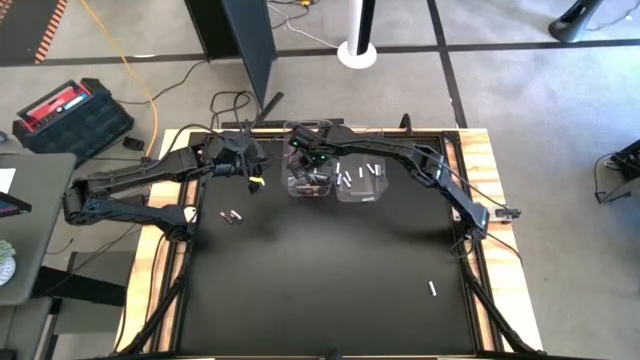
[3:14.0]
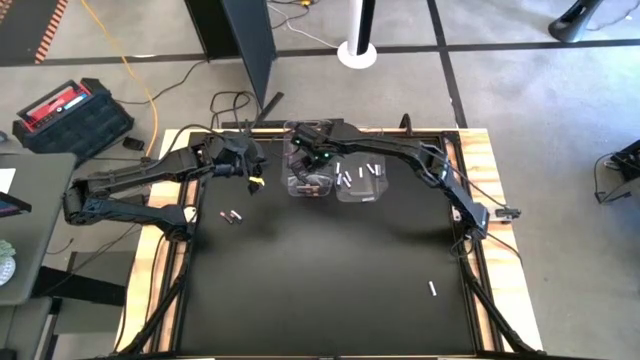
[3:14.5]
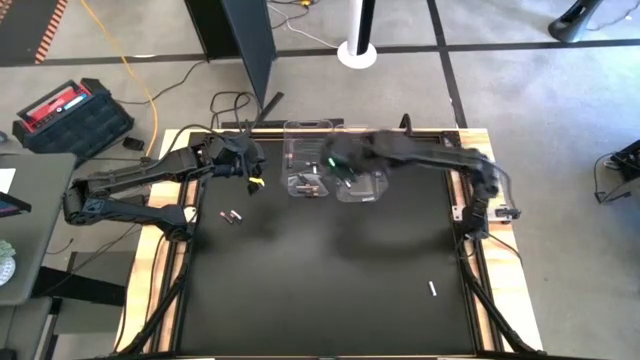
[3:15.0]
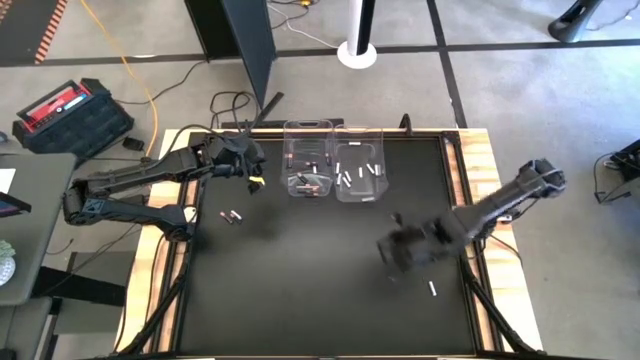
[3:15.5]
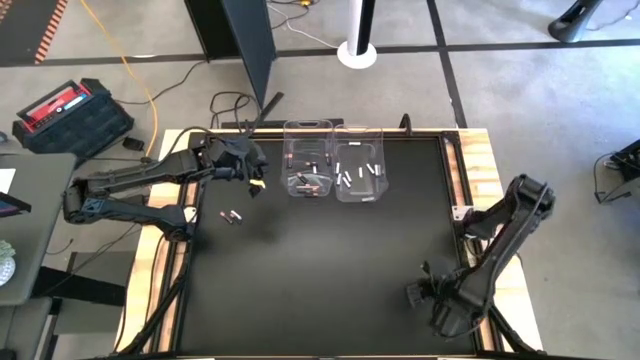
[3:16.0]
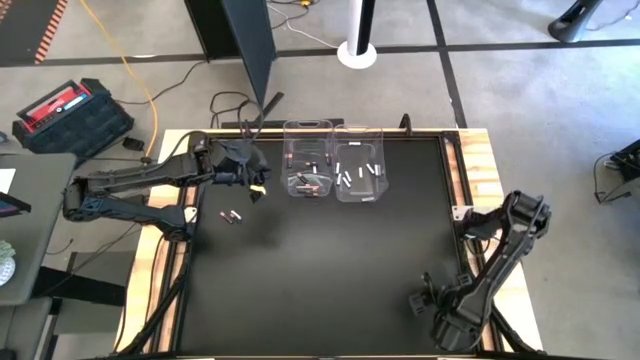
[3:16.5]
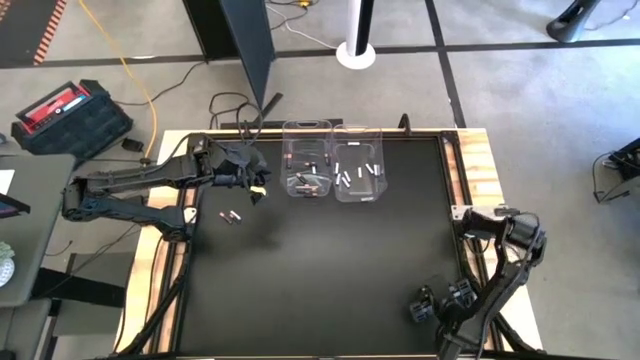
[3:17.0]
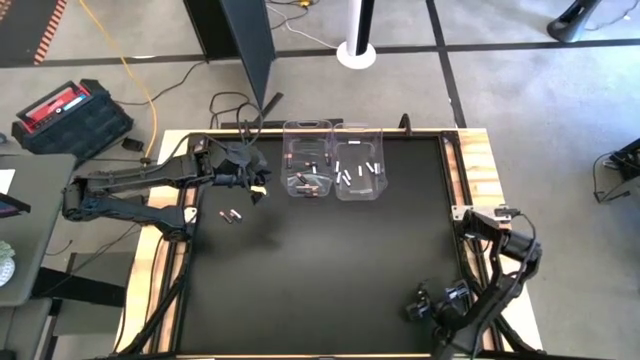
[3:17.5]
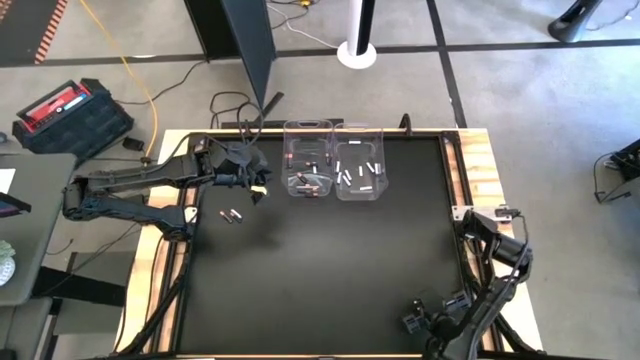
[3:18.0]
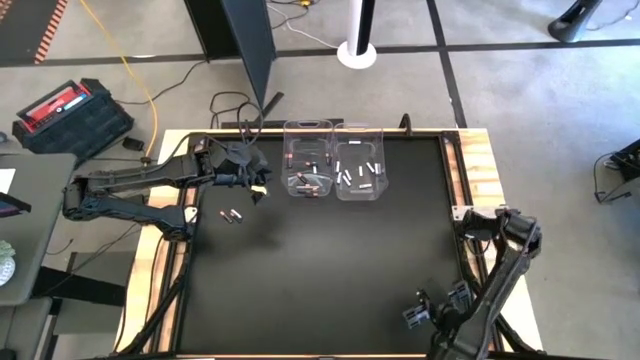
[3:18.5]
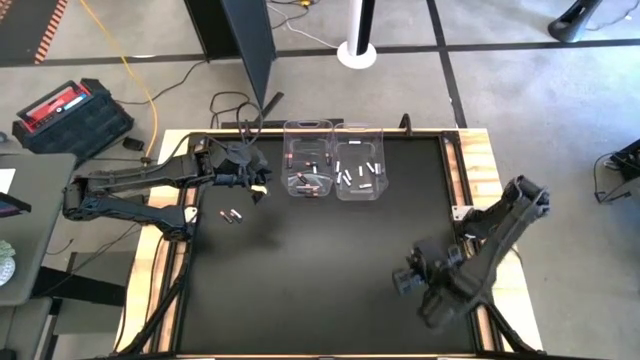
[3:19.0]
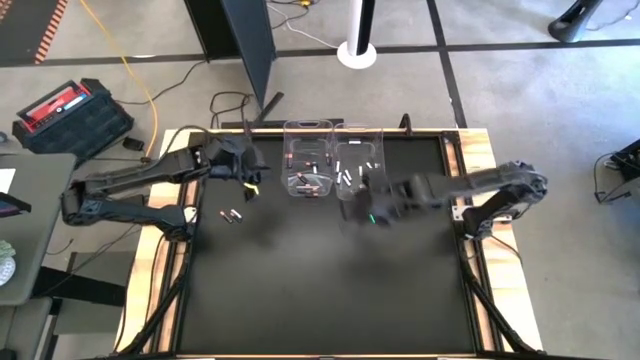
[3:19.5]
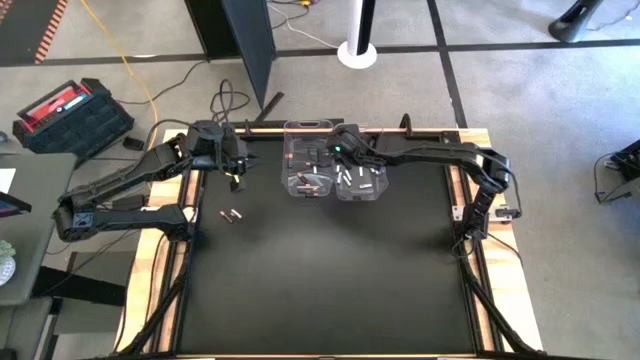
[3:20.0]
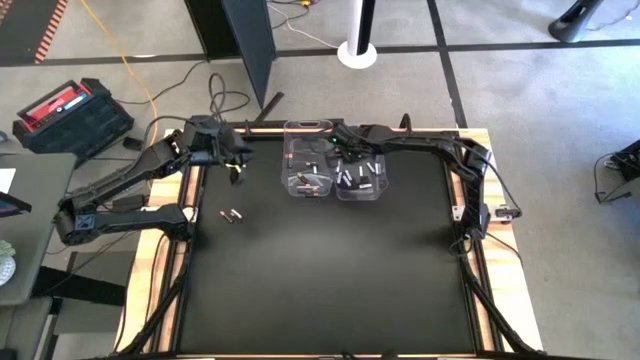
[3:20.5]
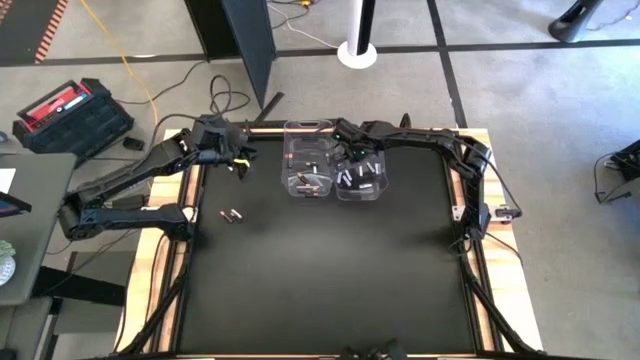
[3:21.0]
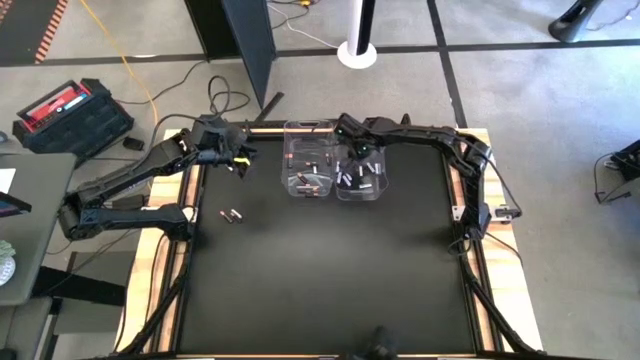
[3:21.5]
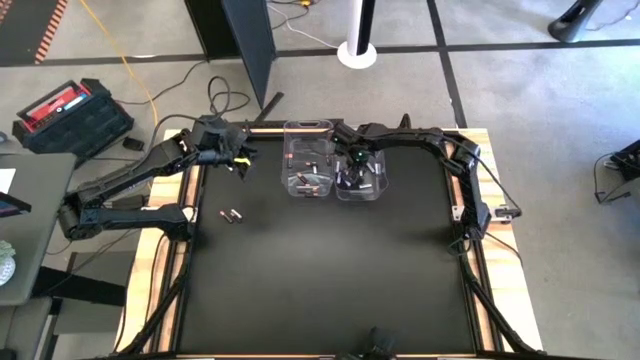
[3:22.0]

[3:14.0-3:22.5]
Task: Sort batteries
Put the white battery into the right transparent bin

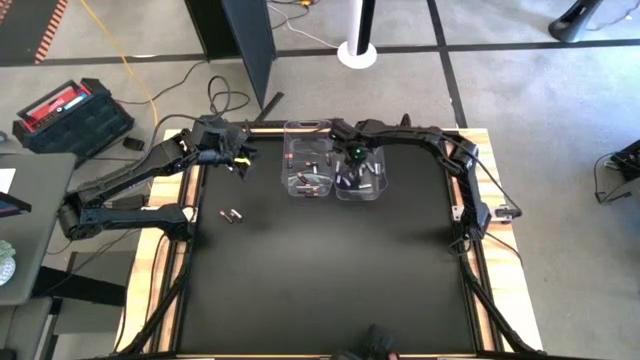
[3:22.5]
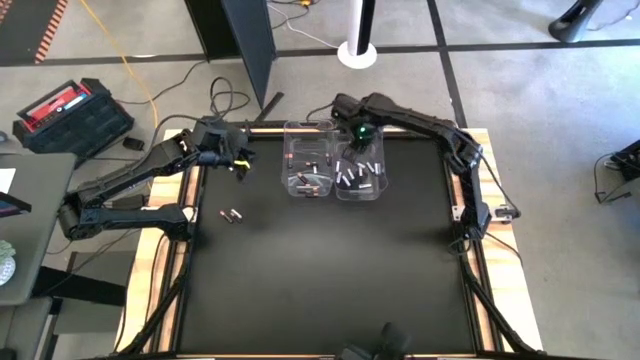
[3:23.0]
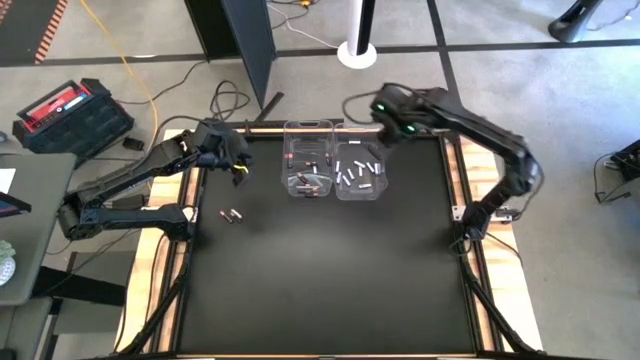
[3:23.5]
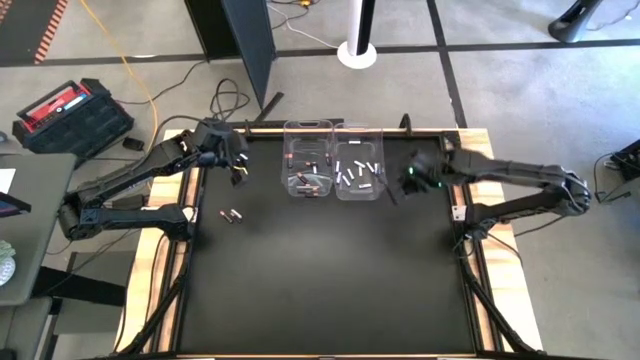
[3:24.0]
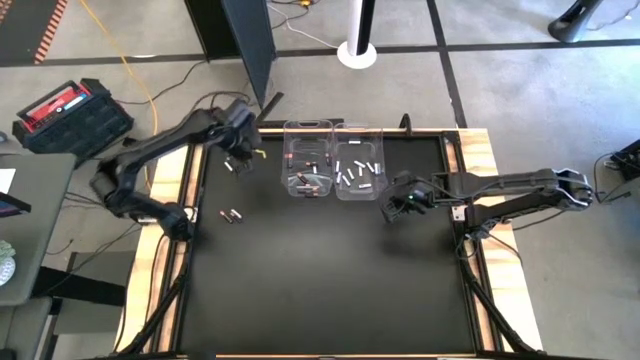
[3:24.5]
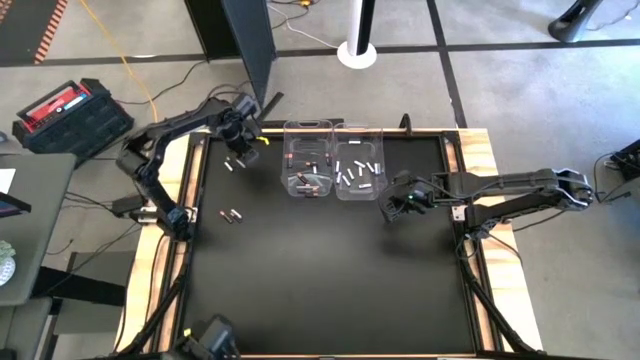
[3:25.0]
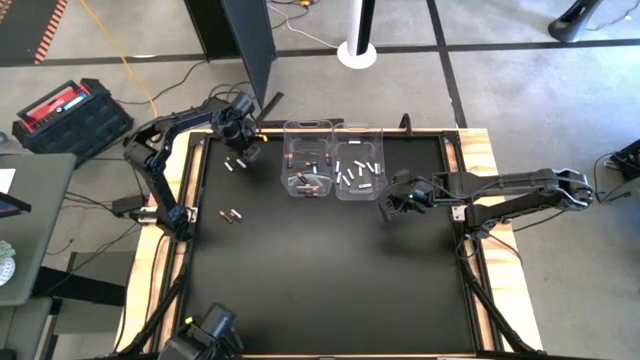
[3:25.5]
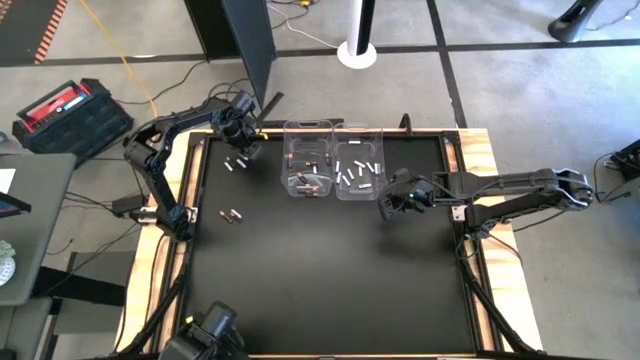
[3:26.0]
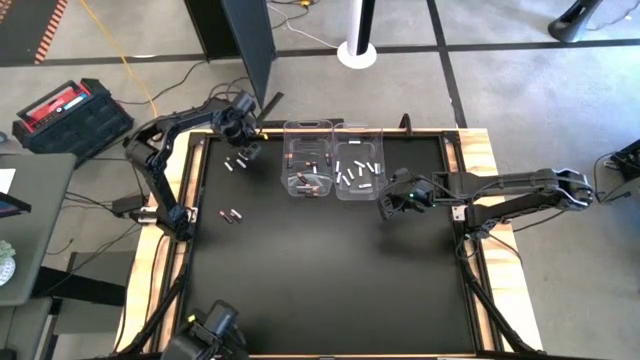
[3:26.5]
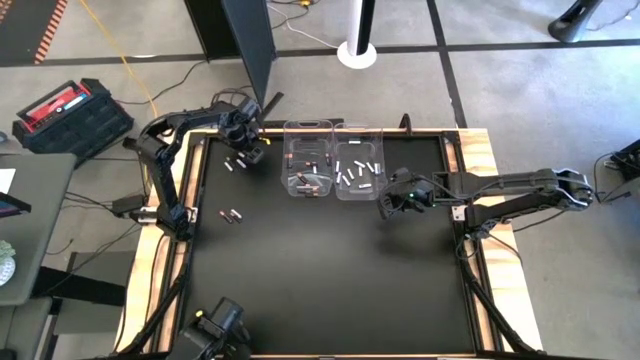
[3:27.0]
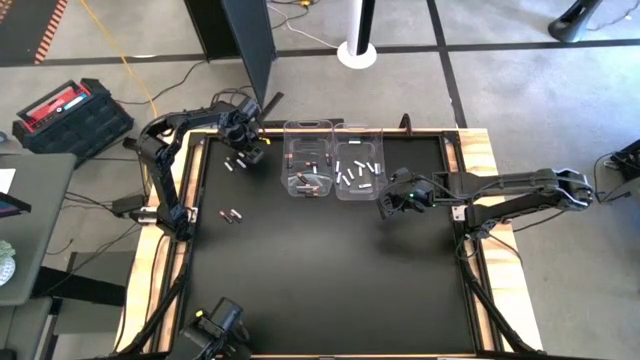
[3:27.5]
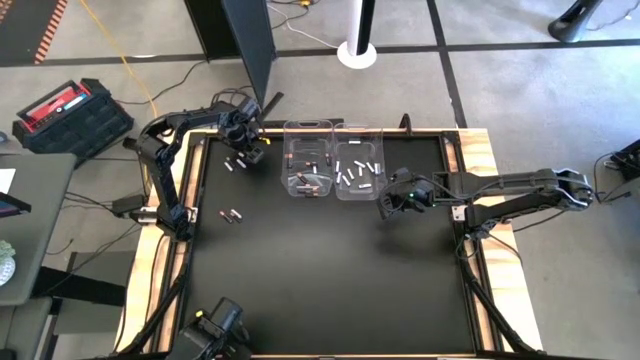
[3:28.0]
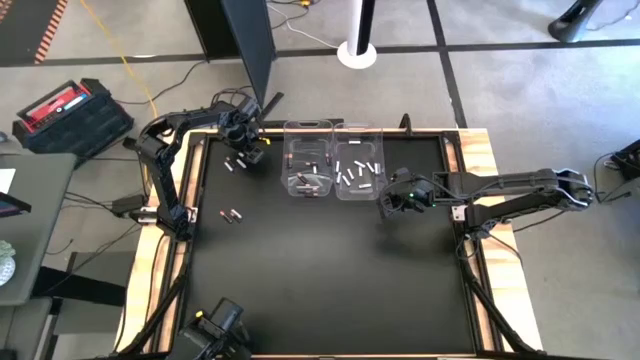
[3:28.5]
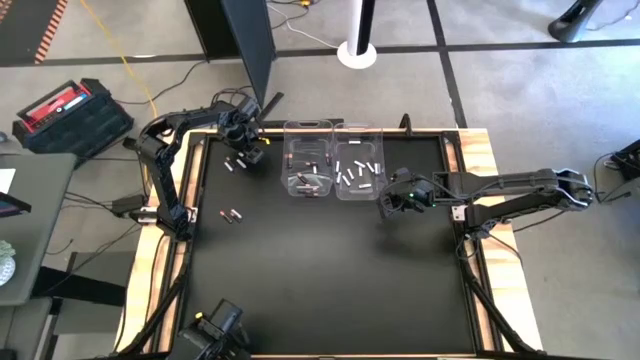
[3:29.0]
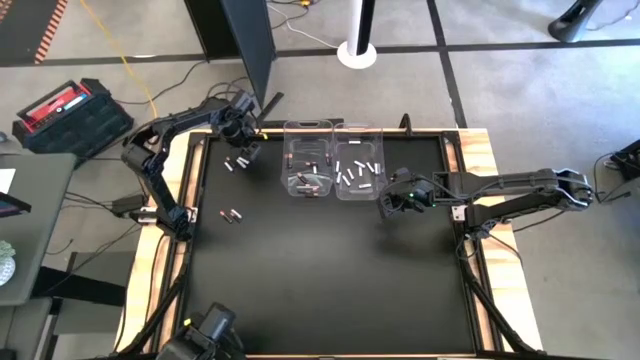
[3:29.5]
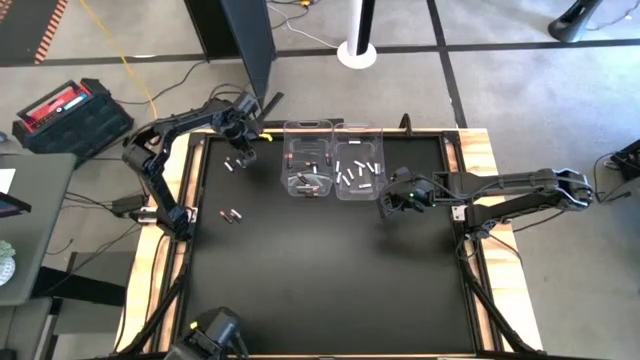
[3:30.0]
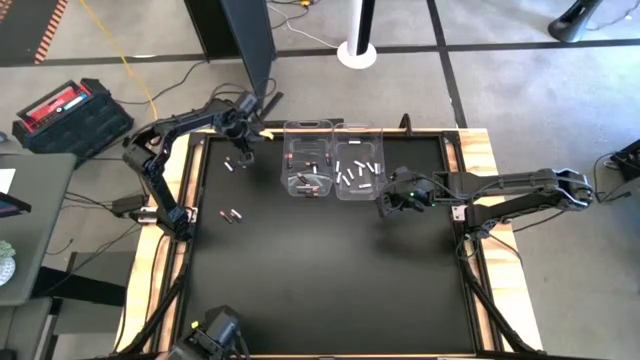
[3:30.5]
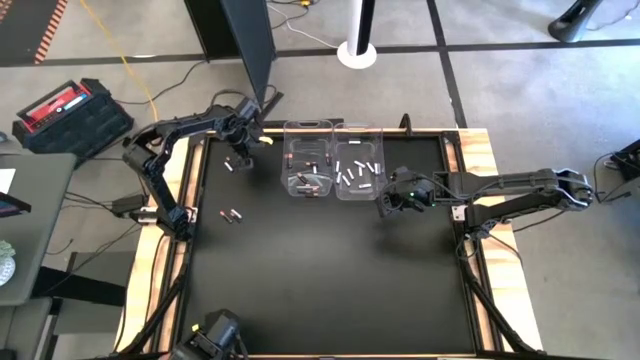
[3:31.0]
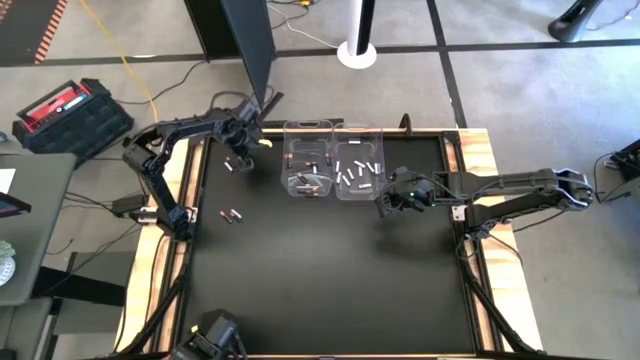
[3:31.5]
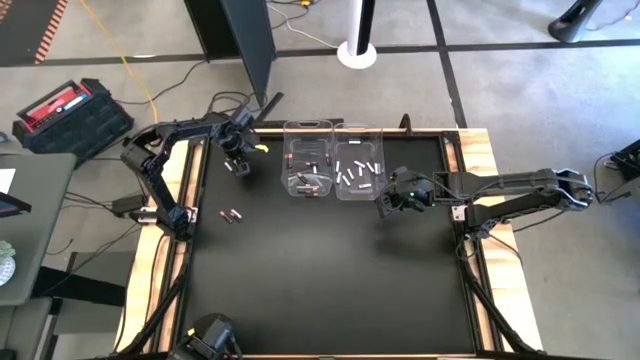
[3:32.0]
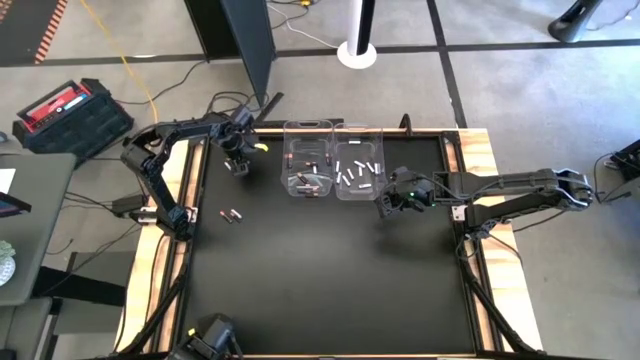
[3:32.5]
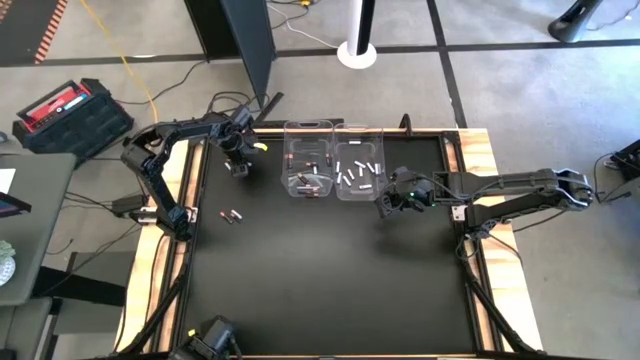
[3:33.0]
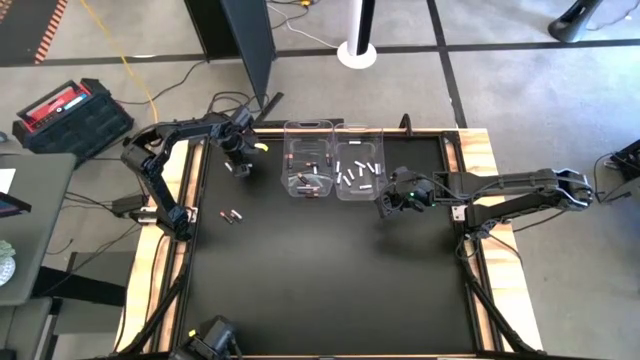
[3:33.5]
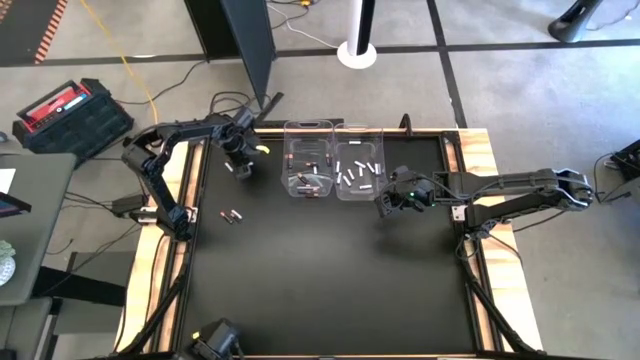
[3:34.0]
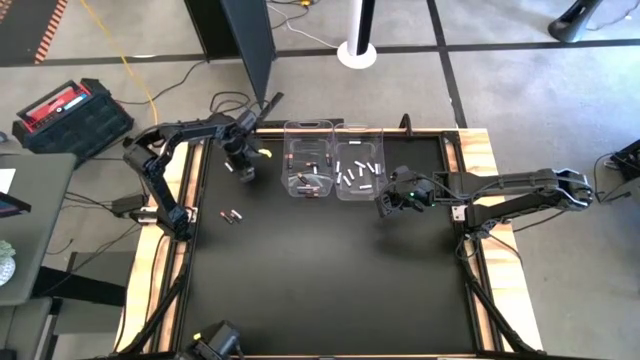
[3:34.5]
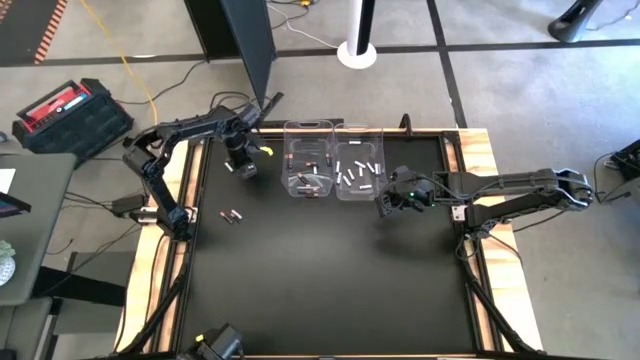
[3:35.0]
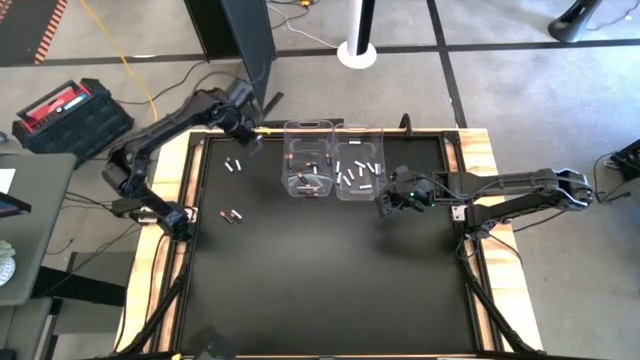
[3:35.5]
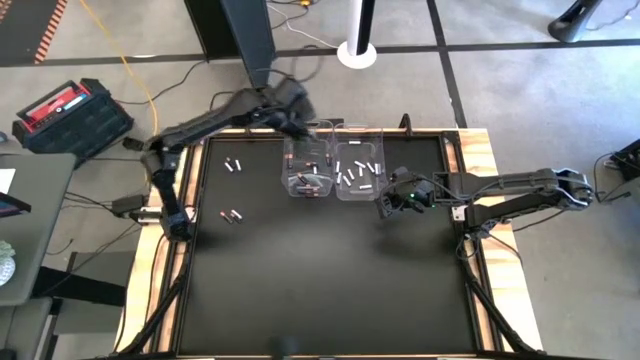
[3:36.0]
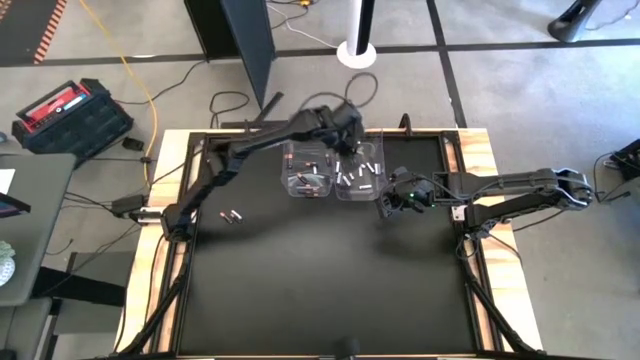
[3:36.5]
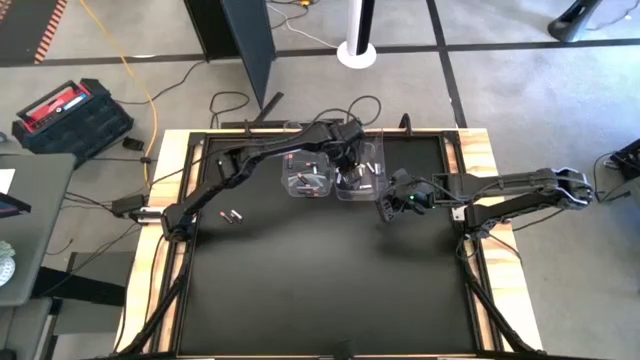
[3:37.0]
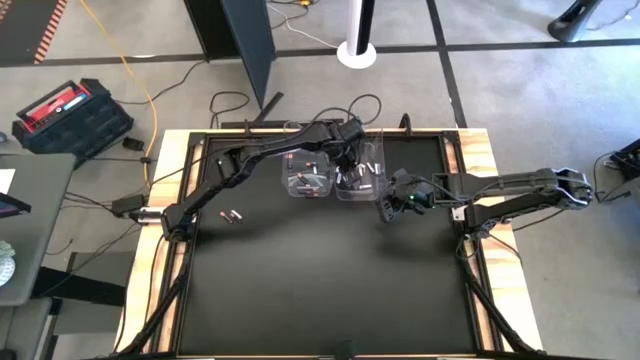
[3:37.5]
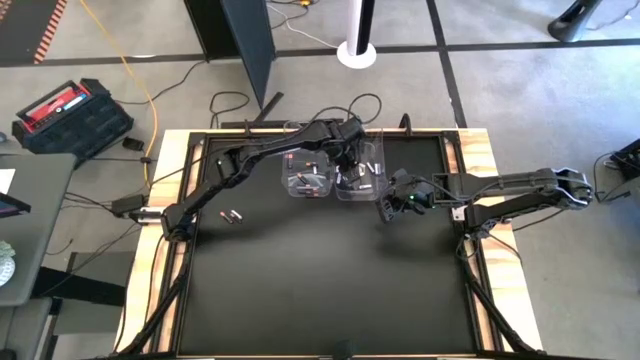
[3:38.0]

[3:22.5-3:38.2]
Put the white battery into the right transparent bin
